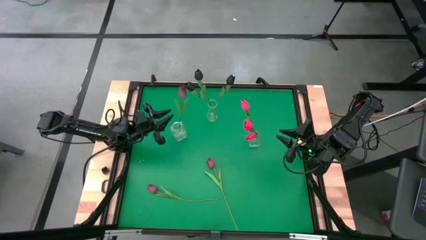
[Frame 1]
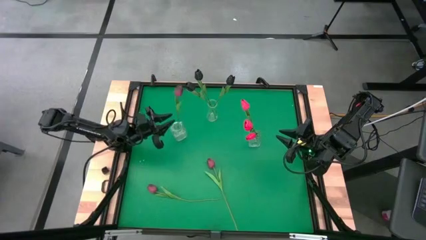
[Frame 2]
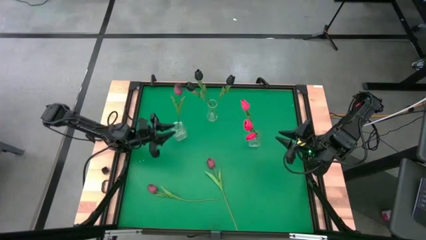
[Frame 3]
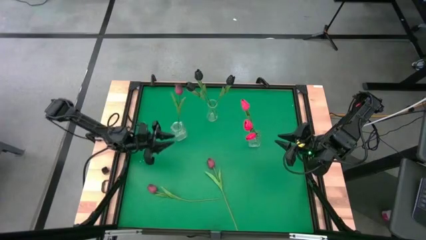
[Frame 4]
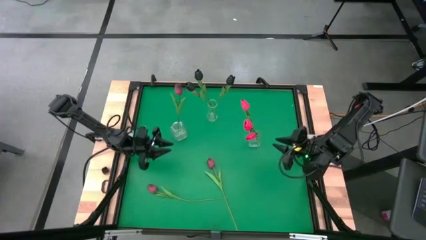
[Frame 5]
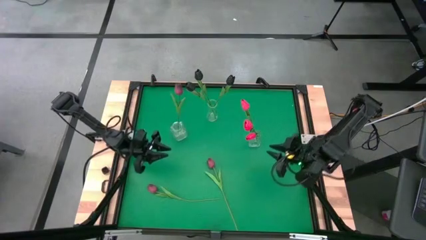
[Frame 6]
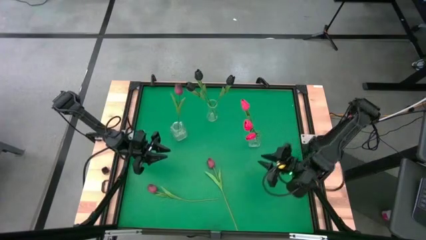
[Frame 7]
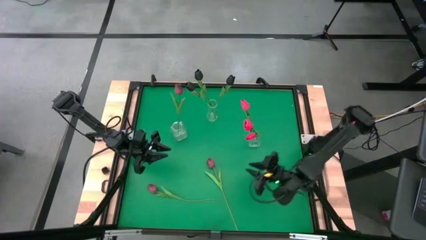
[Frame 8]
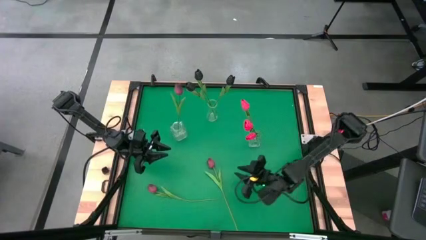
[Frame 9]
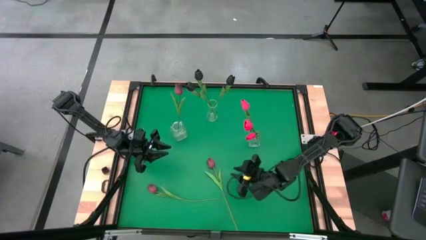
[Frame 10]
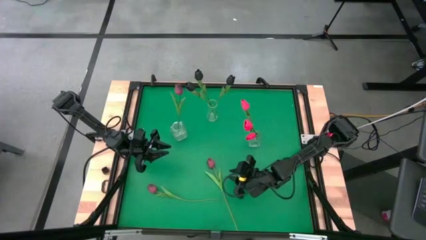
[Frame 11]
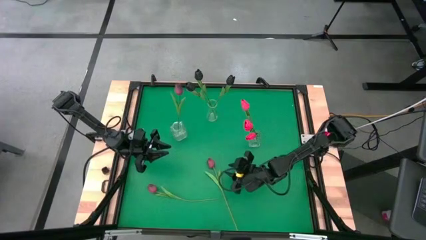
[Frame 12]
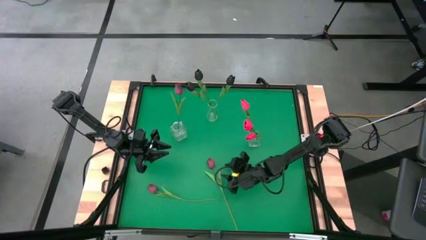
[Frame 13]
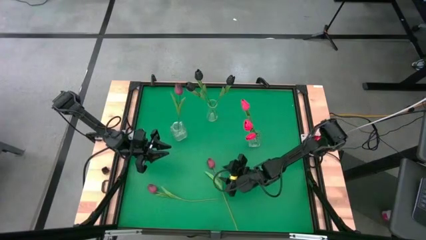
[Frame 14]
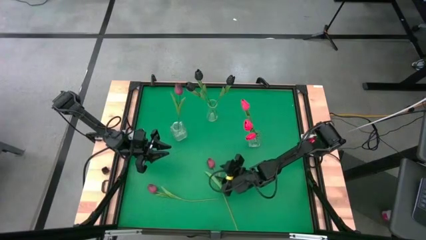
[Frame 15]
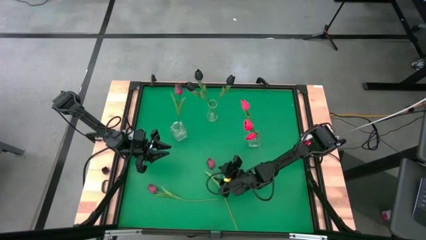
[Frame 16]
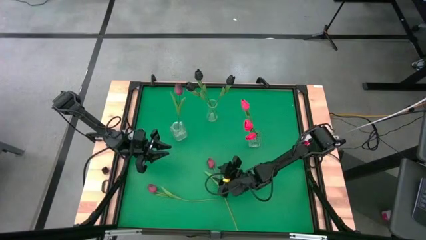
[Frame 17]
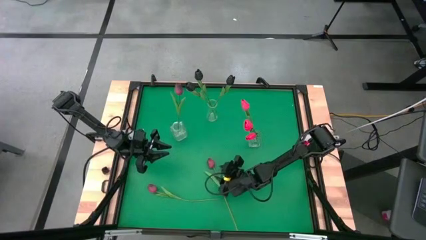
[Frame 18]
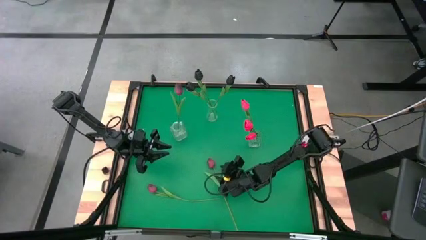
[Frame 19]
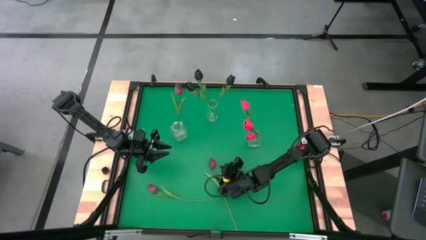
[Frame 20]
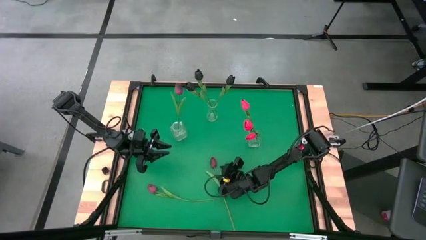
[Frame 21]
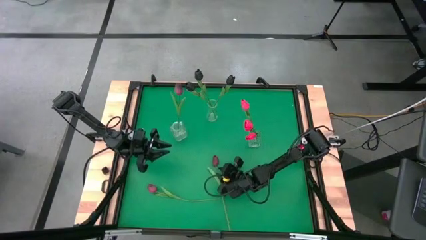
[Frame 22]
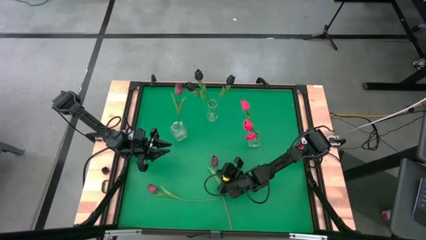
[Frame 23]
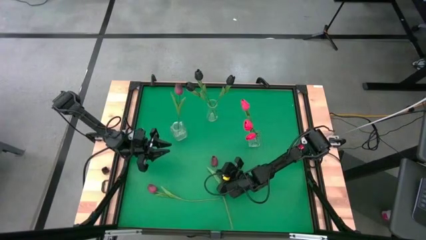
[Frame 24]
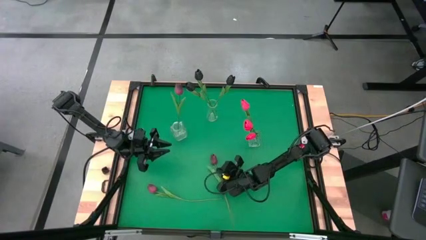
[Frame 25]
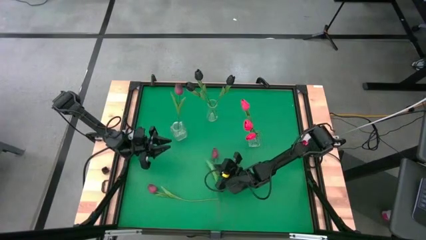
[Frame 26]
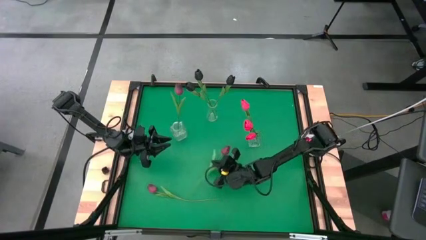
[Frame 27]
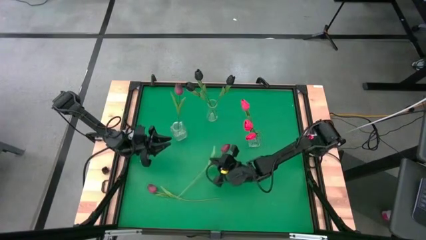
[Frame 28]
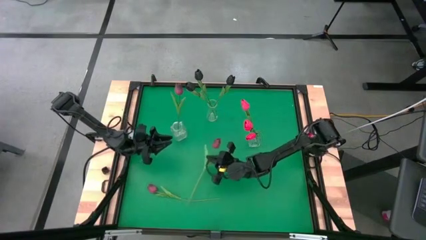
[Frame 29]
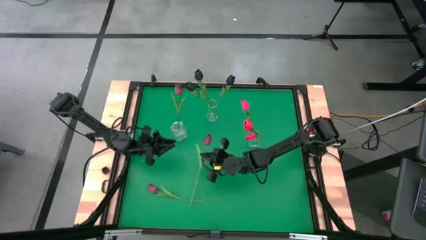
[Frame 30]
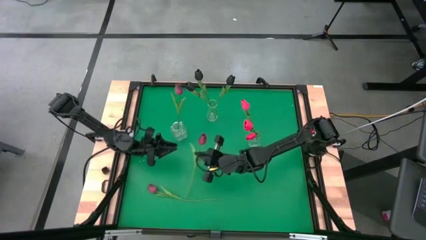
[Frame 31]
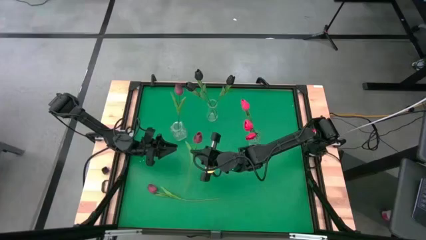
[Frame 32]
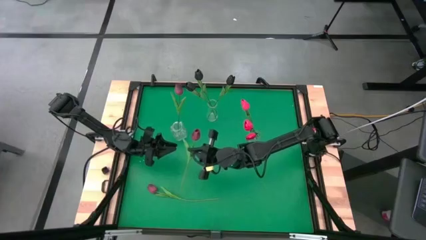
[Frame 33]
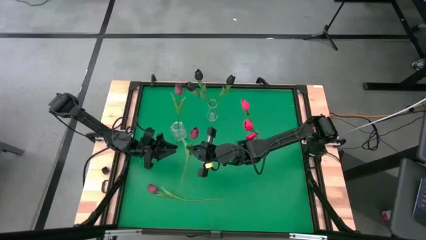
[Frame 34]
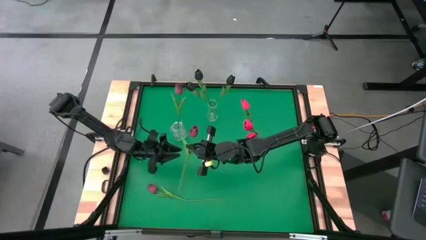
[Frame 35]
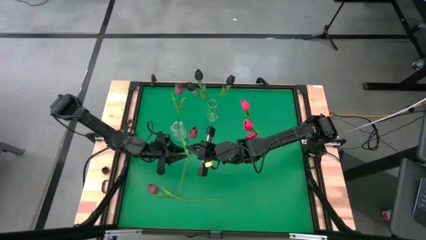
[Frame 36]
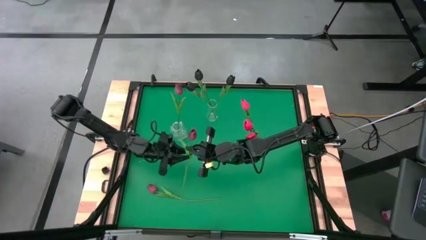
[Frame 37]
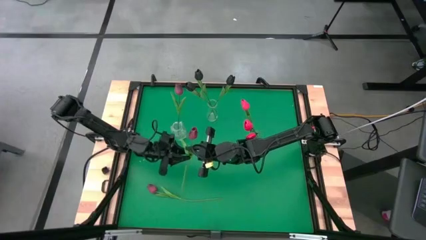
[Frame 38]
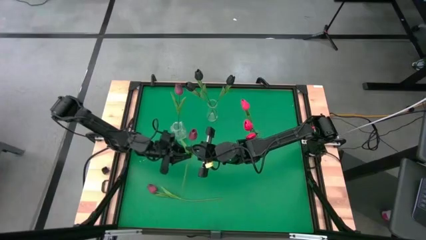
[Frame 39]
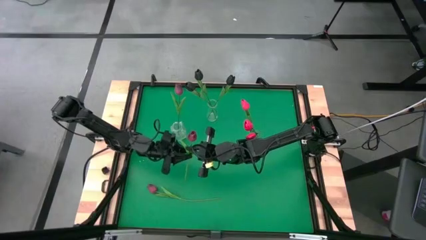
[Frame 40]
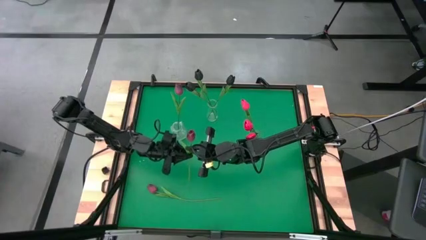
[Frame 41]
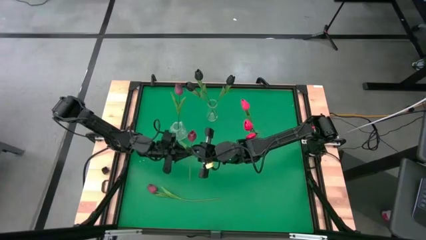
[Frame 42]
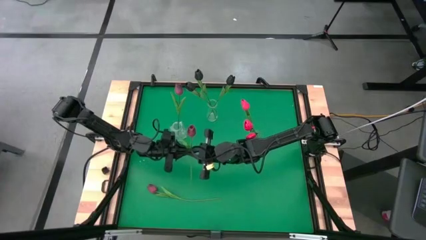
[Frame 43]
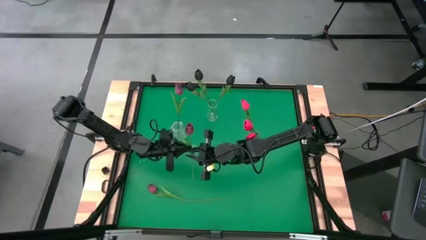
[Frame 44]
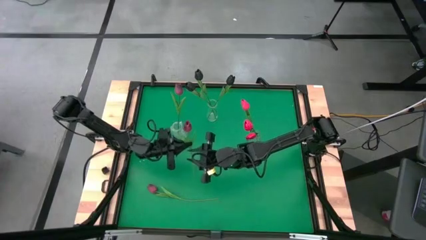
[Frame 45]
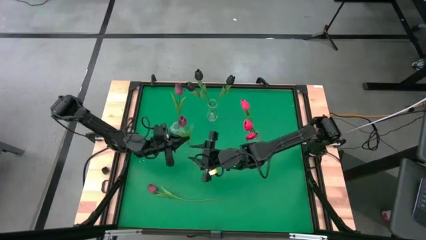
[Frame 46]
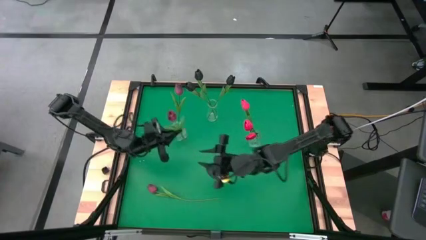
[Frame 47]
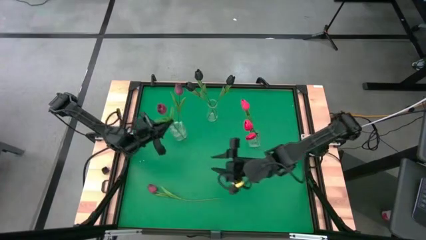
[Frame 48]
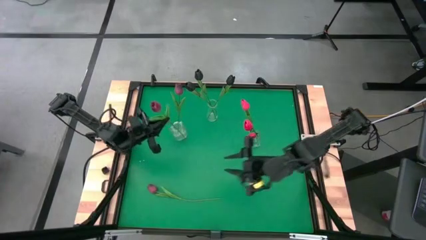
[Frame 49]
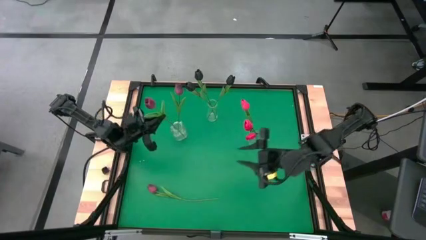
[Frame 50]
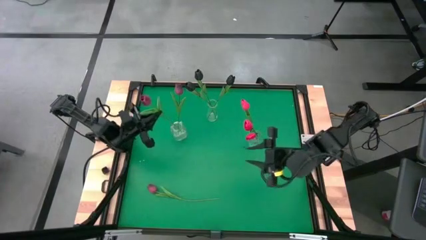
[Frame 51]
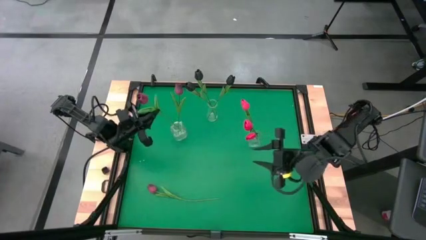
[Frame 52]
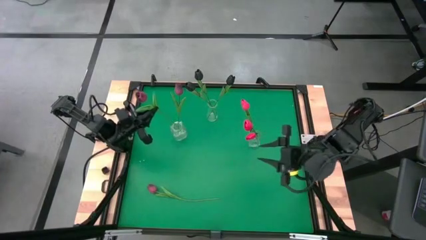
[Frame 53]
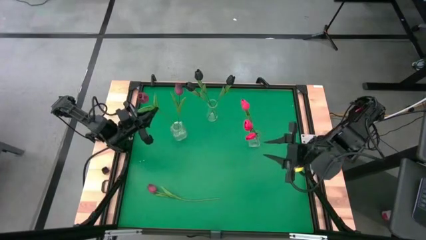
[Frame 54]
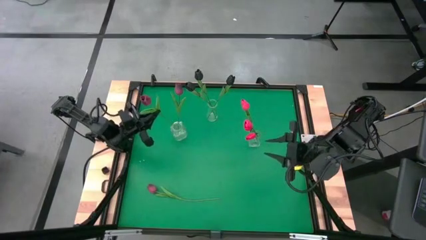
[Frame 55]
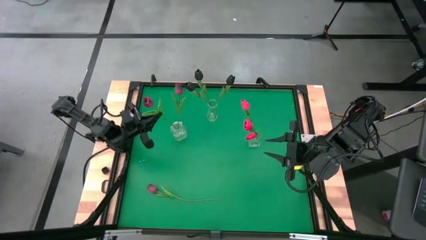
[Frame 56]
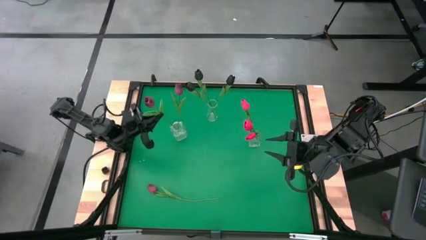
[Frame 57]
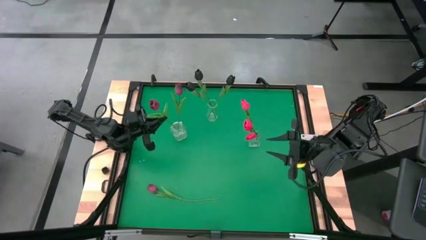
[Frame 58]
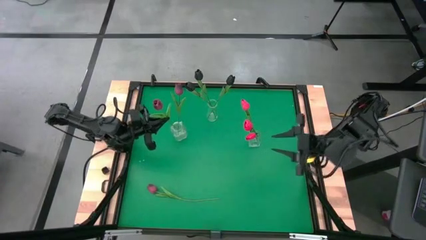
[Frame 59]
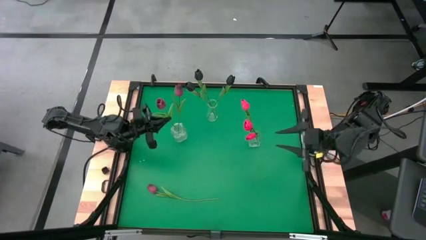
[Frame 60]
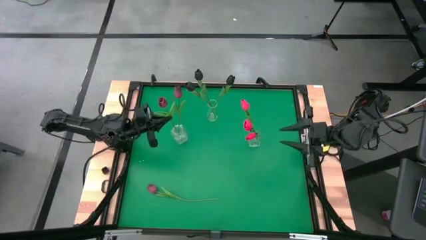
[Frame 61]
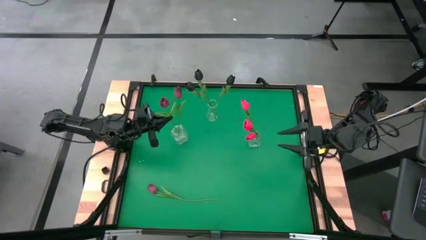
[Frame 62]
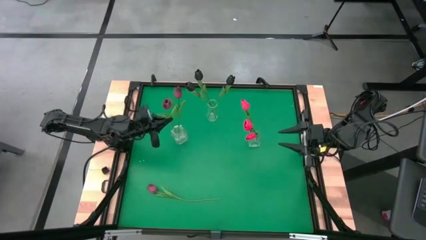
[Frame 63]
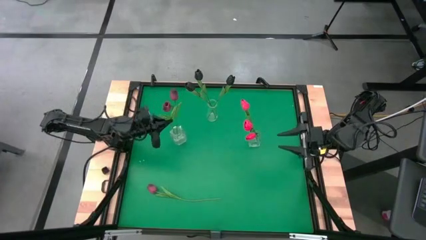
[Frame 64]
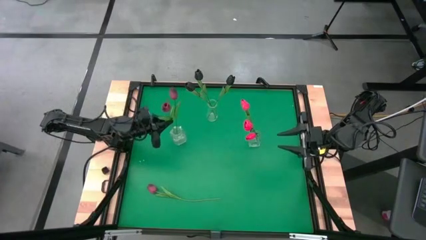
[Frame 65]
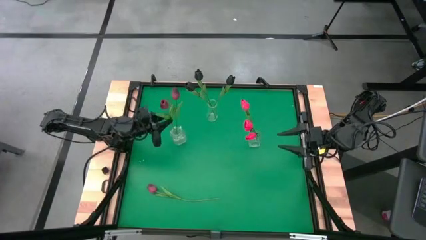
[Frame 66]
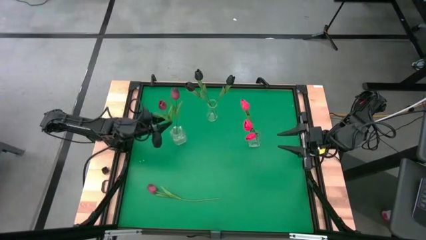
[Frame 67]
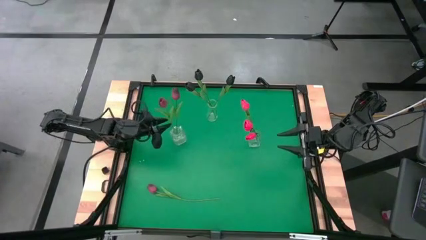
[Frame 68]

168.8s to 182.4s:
Task: Sort flowers into vase by color
Put the right red tulip into the bottom left transparent vase

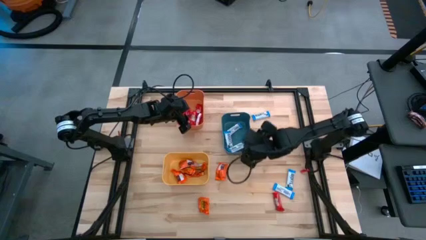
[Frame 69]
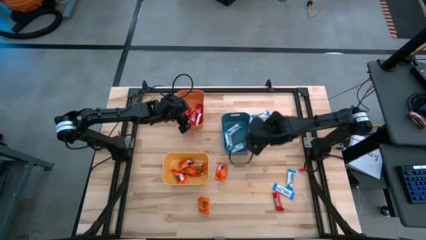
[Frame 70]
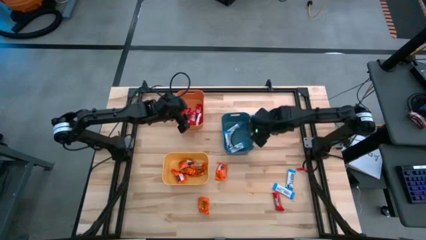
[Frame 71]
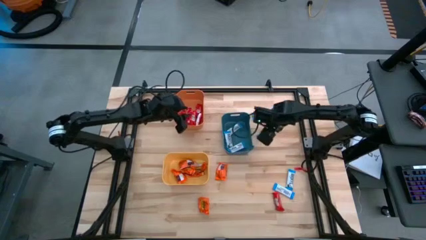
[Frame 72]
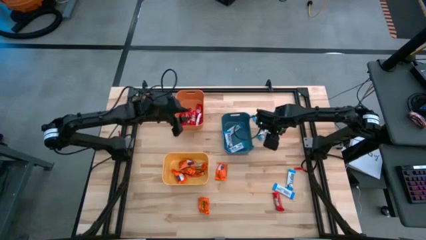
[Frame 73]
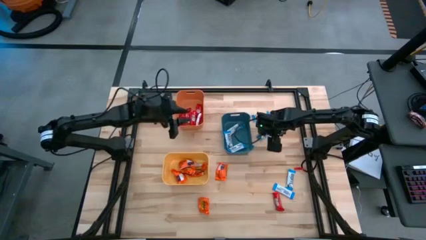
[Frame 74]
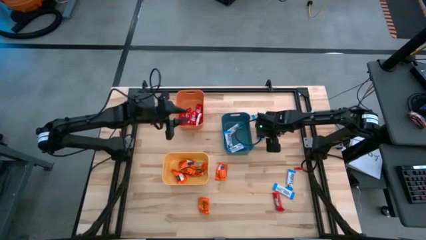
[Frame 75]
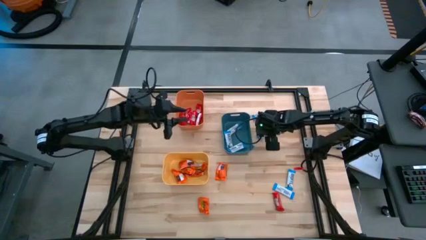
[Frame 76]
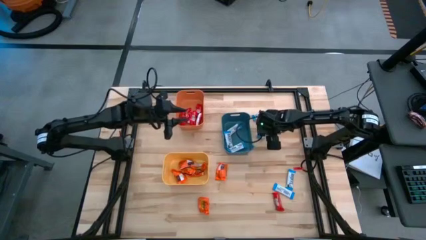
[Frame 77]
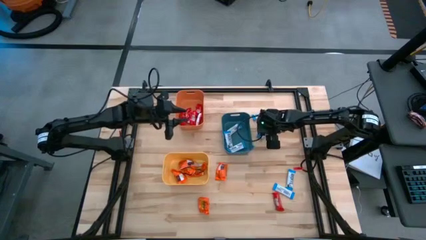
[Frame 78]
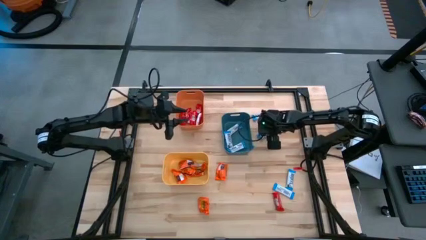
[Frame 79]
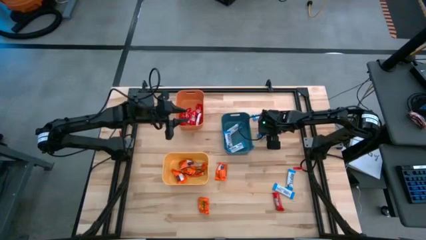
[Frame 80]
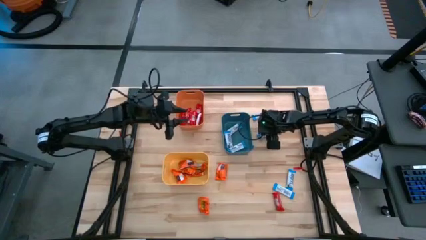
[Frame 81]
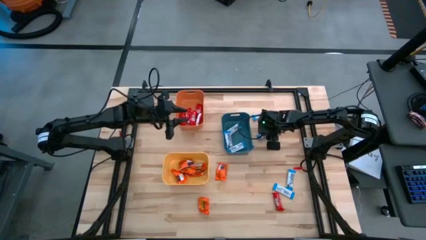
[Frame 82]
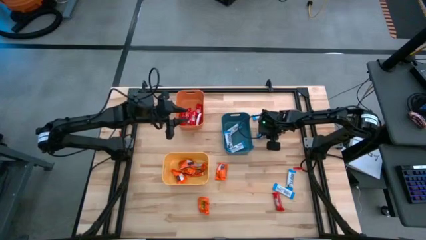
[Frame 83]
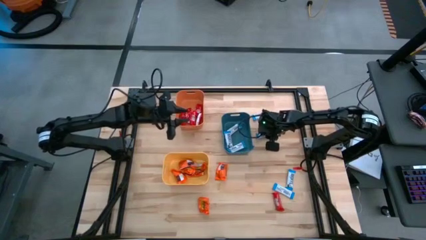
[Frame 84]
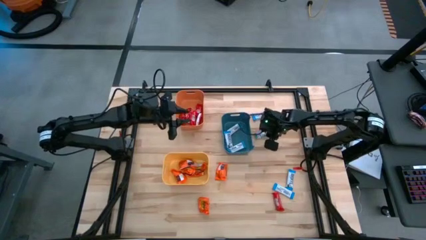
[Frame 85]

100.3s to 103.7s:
Task: Organize candy in baskets
Put the white chocolate into the blue bin
